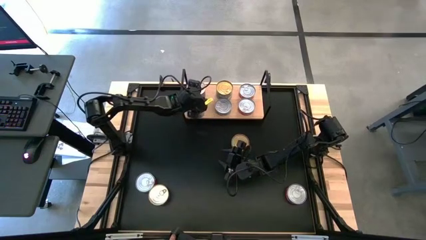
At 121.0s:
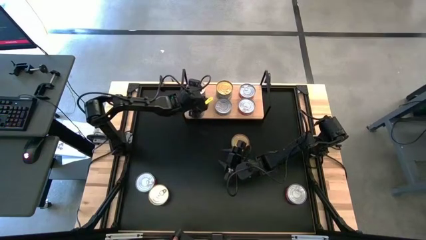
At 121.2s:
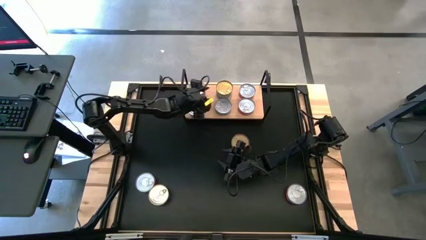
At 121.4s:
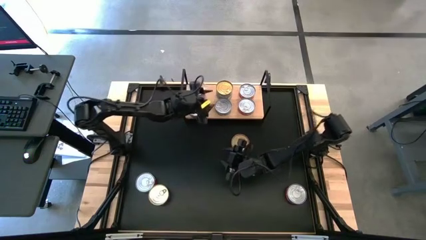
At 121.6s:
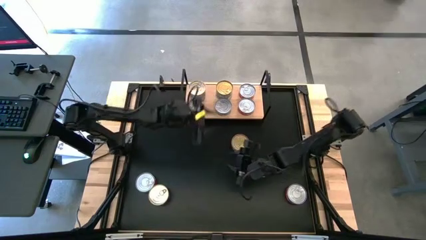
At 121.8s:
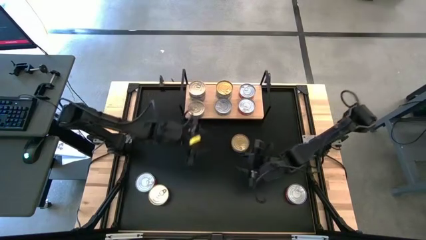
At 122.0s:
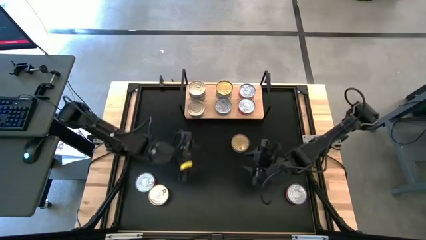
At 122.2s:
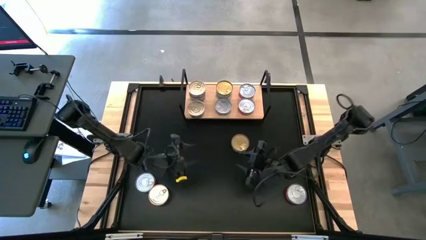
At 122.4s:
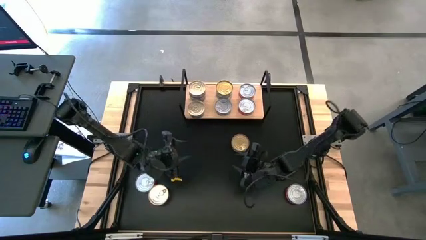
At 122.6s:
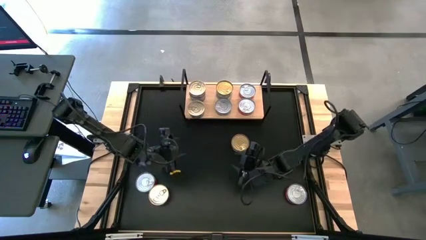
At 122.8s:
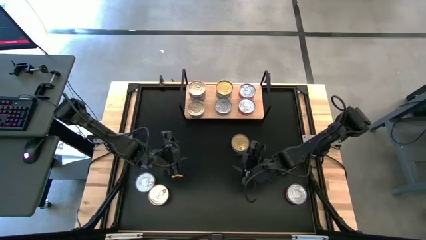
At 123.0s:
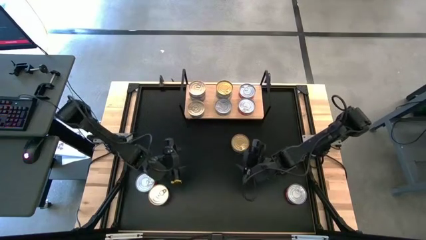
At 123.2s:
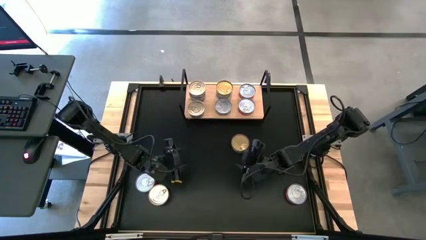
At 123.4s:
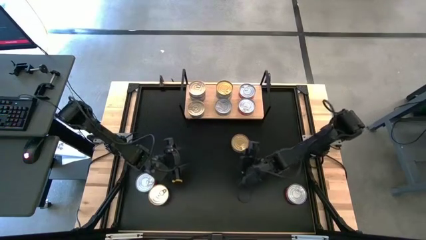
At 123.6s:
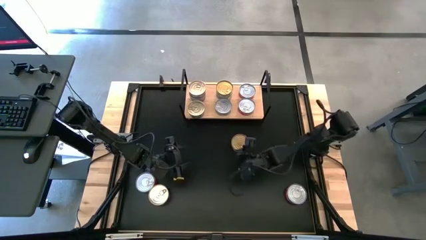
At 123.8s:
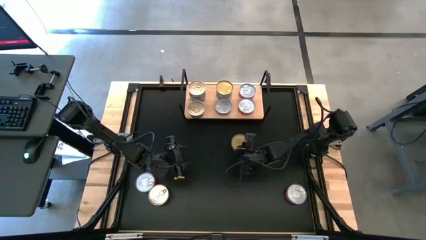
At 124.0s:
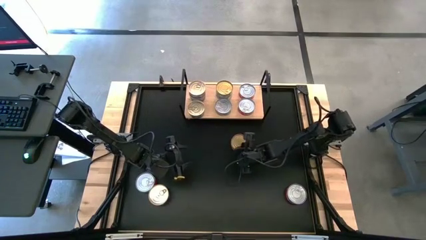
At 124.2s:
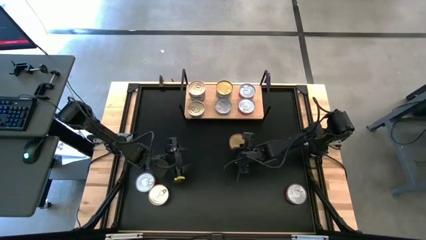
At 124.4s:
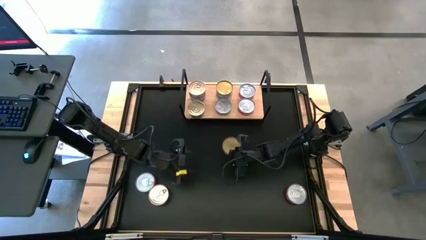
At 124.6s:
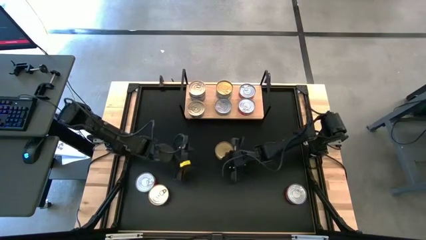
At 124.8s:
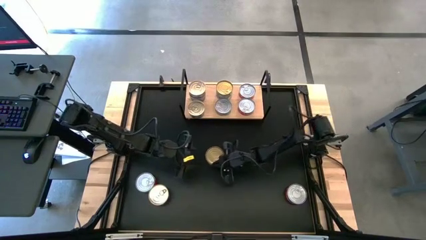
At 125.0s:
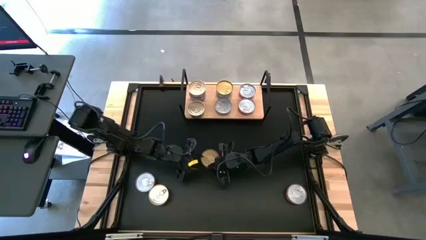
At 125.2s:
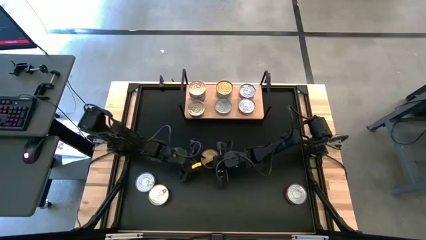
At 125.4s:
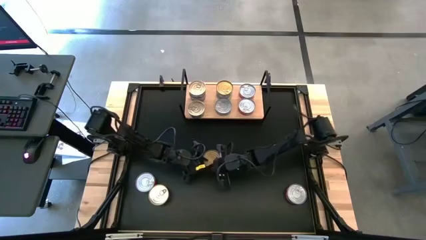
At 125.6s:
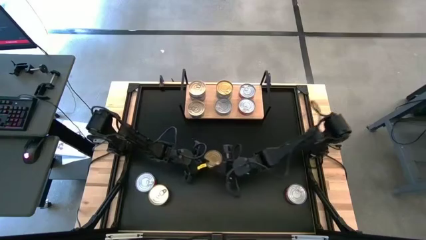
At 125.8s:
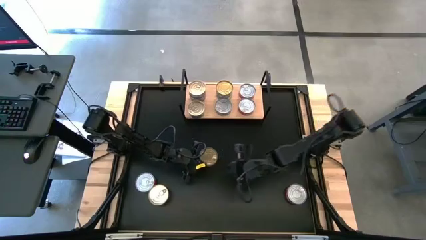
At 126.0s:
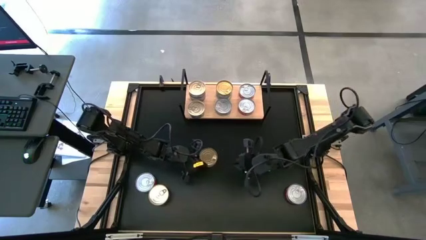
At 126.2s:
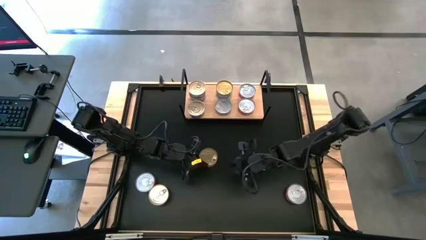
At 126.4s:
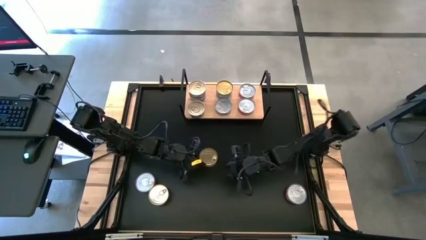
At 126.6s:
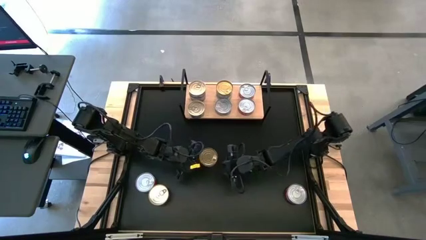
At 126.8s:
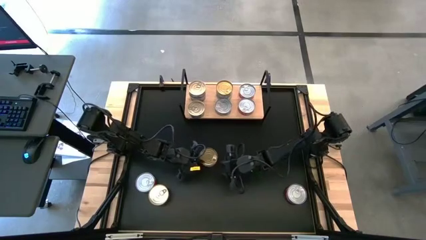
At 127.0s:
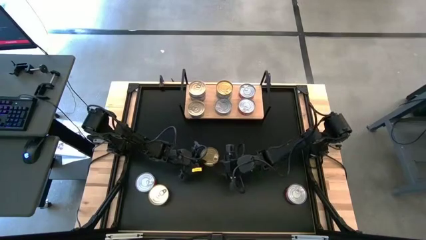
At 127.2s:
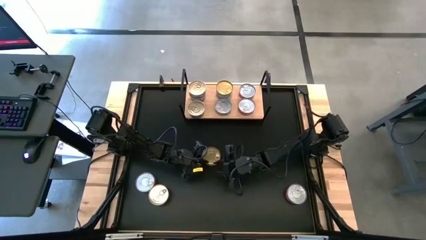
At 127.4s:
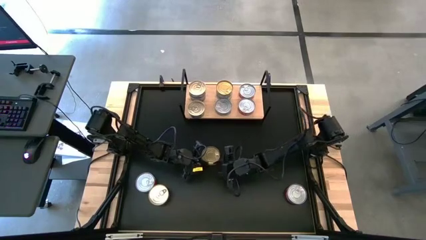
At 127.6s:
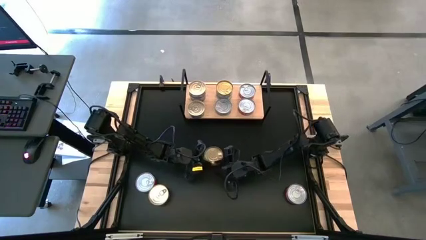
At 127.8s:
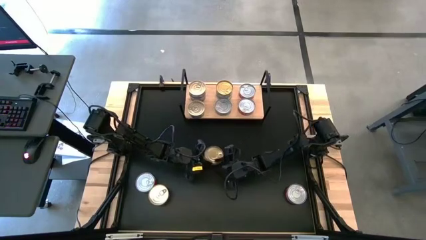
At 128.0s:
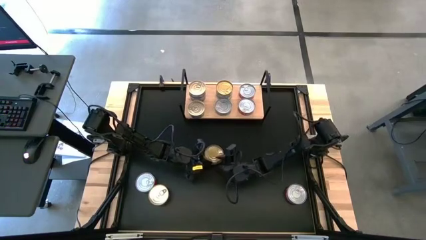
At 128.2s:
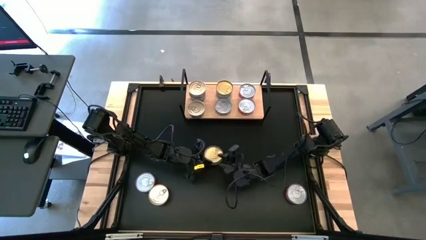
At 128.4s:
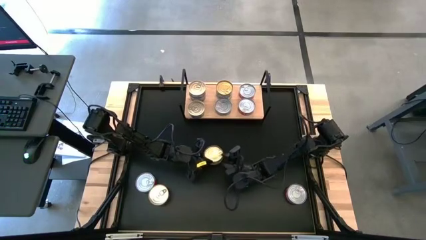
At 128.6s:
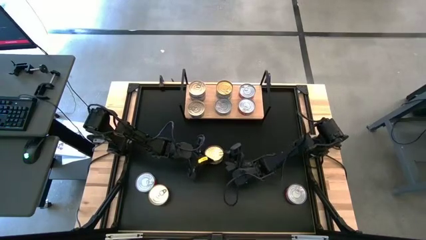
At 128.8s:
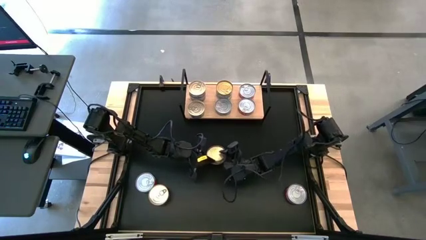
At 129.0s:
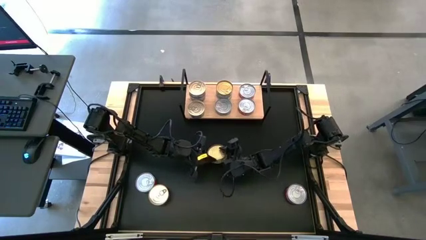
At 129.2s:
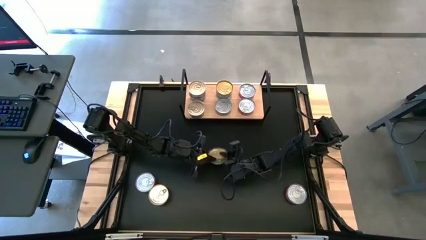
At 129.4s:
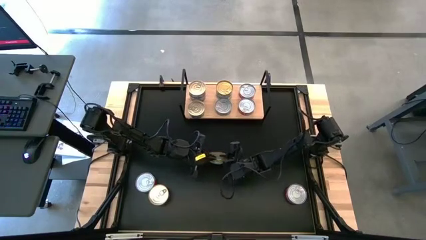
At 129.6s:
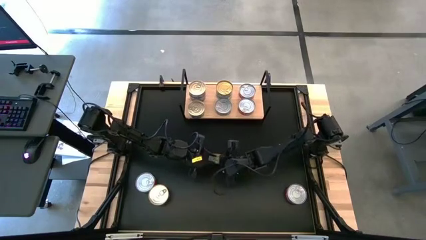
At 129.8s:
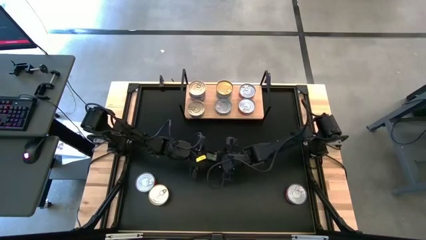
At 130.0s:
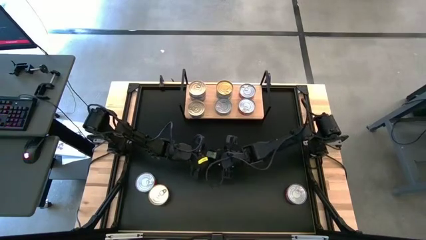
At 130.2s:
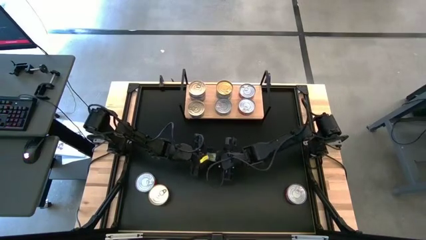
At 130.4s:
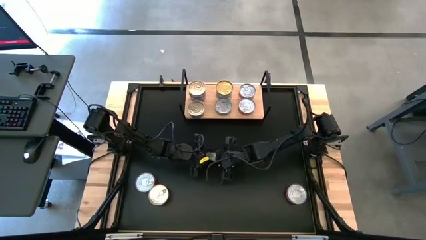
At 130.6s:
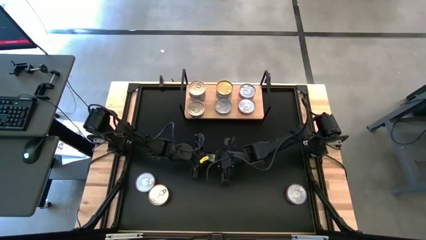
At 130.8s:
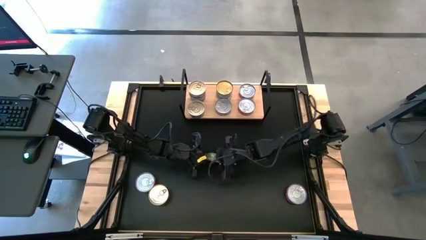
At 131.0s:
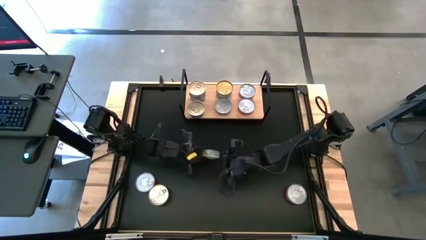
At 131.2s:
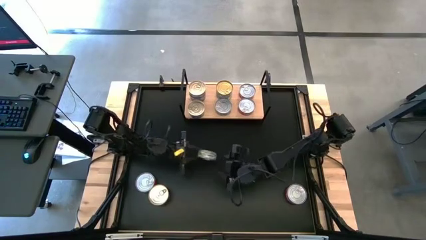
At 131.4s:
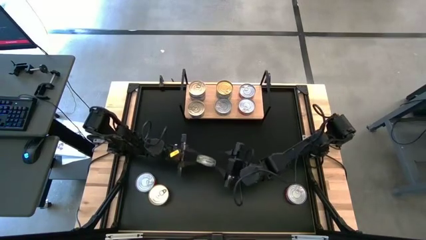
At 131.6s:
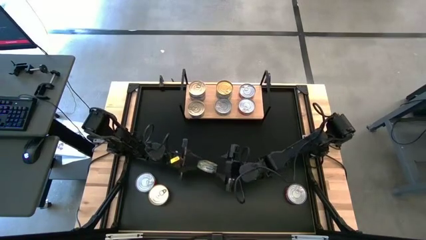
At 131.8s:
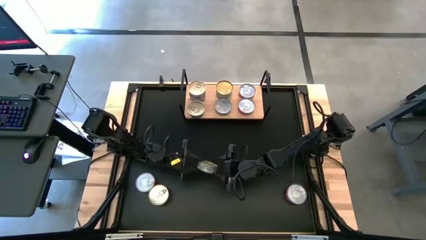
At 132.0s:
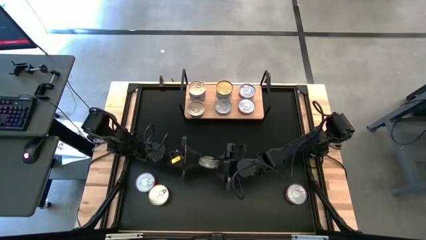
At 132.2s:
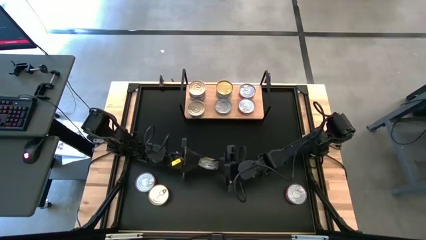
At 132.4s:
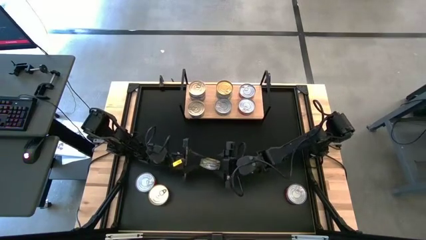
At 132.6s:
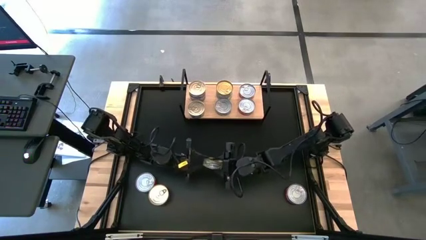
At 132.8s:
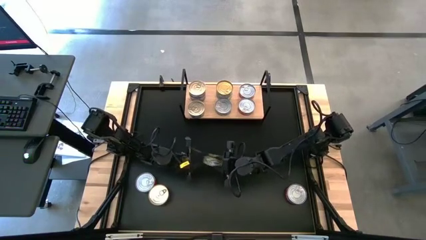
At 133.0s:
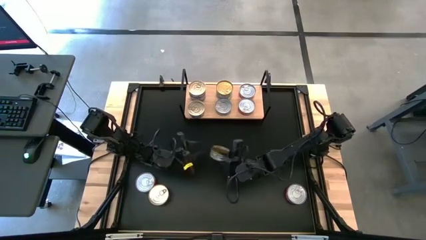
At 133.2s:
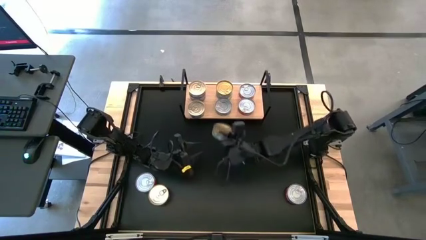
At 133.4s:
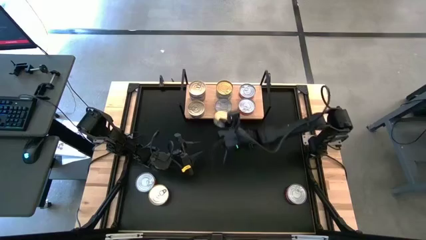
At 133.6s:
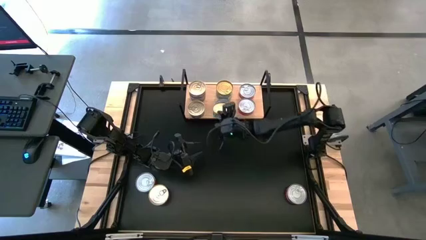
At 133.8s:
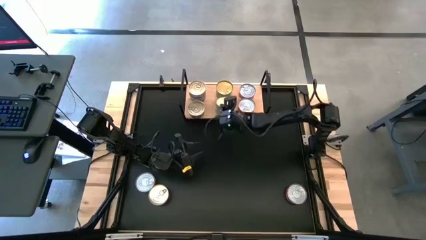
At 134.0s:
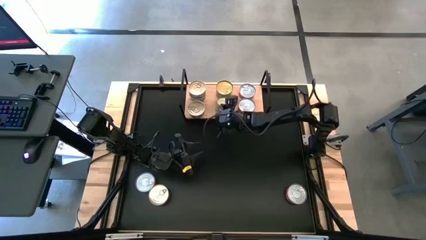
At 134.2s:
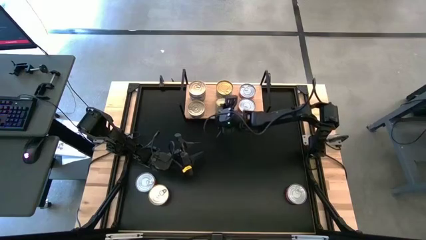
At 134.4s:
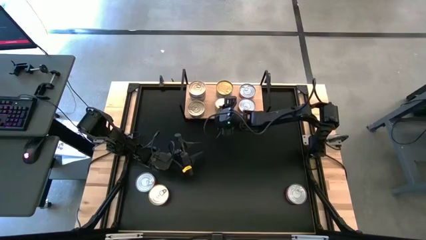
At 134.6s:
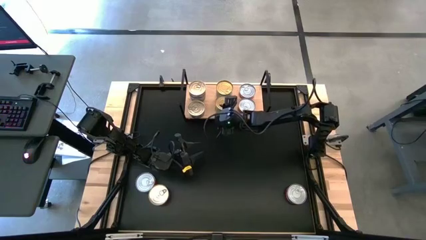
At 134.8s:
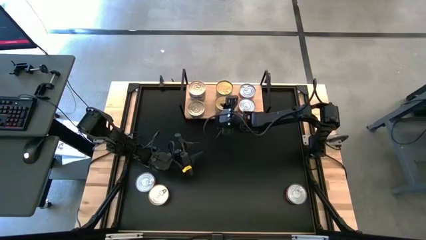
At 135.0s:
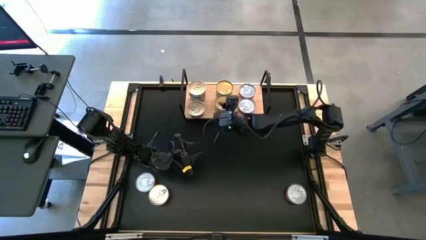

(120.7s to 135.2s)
Task: Stack canned seafood by type on shelf
Stack the green canned tuna on the bottom green canned tuna

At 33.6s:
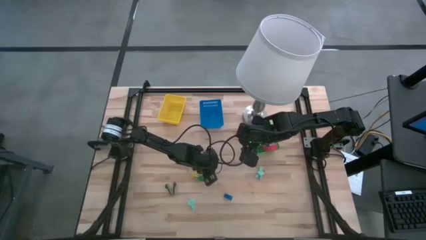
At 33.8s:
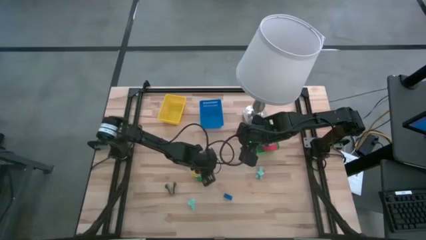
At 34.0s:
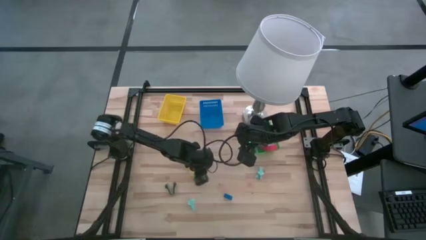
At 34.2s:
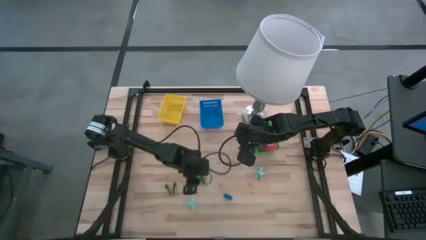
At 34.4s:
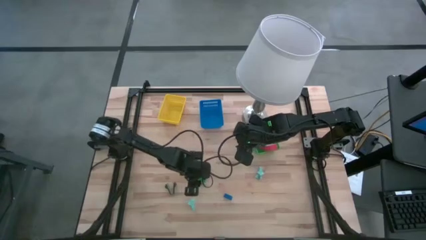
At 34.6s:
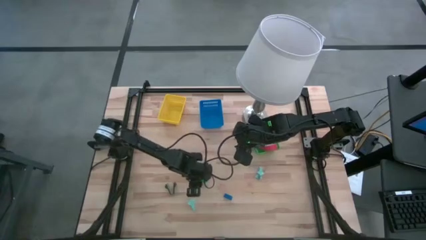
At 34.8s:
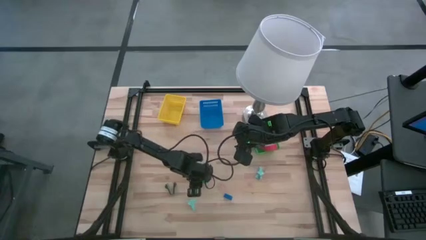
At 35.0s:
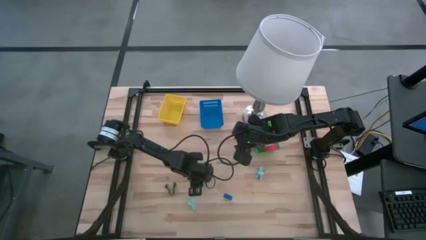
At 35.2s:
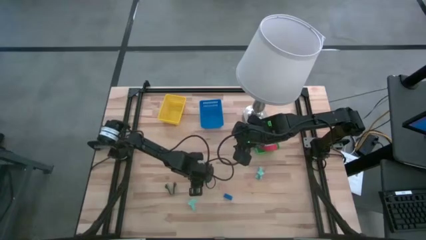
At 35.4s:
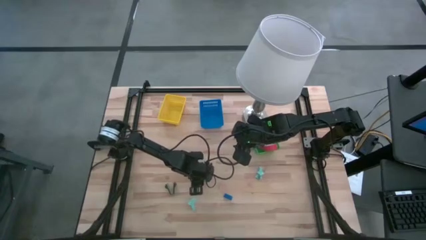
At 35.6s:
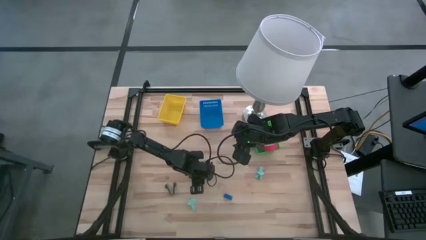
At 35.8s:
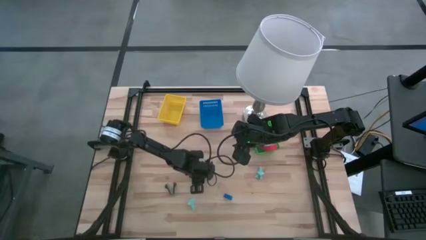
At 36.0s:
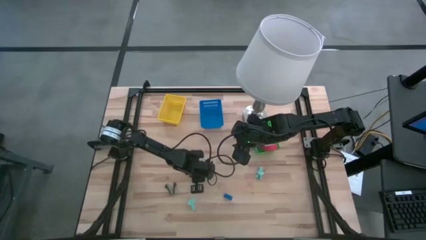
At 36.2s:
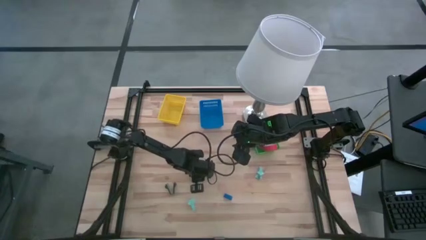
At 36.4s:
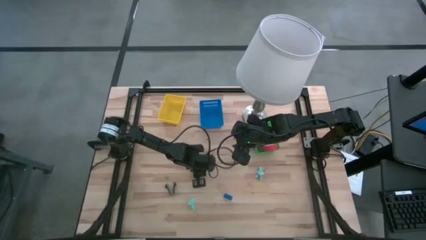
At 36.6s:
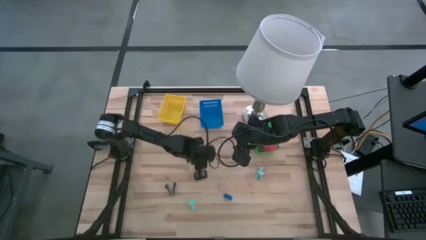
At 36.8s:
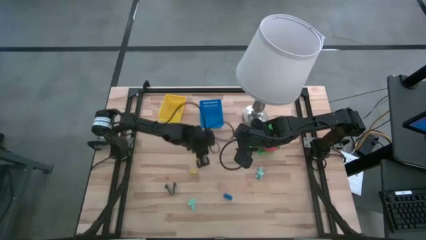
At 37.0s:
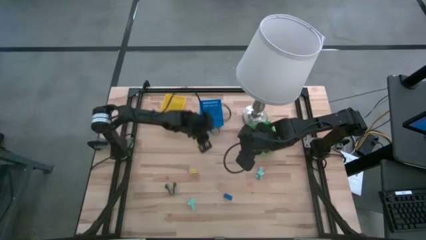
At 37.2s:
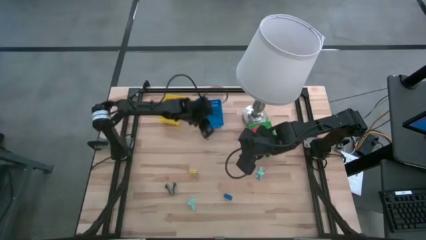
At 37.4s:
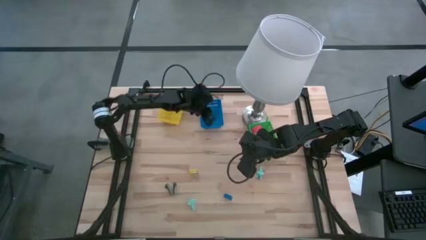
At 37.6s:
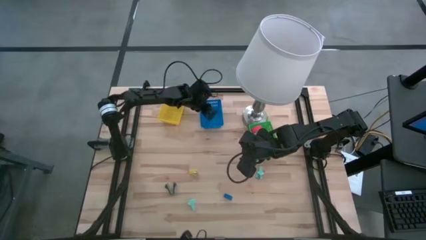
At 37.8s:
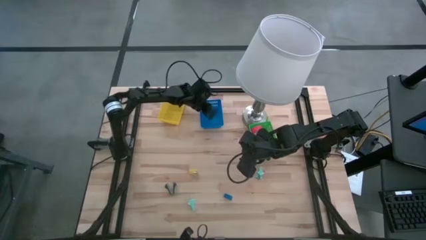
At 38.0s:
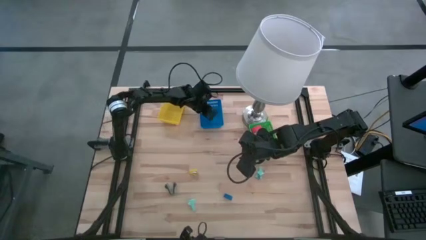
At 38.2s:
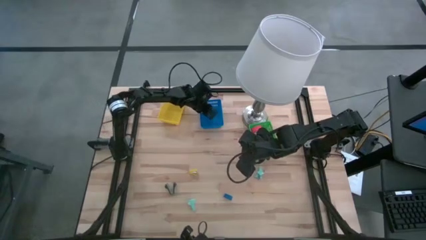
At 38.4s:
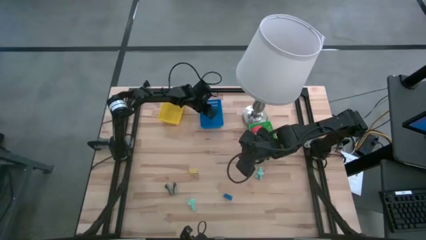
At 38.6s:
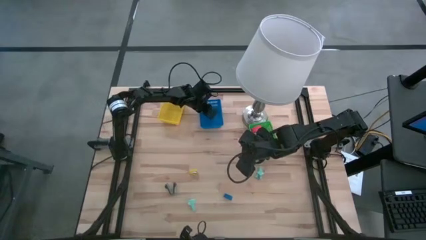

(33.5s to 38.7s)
Task: Pick and place Stapler, Stapler remover, tape
Put the green small stapler into the blue bin
